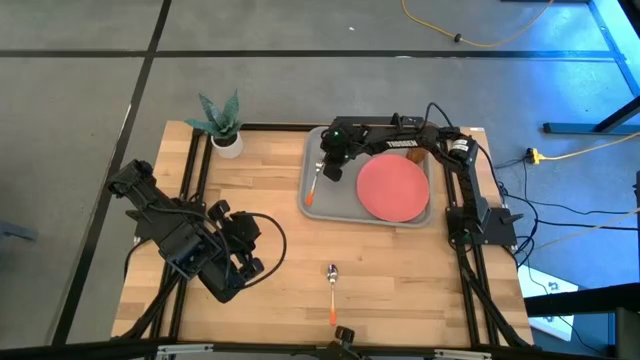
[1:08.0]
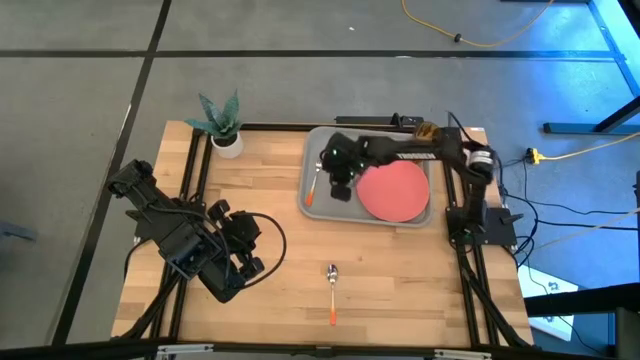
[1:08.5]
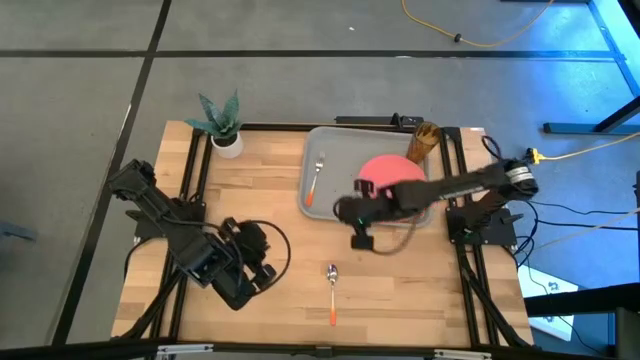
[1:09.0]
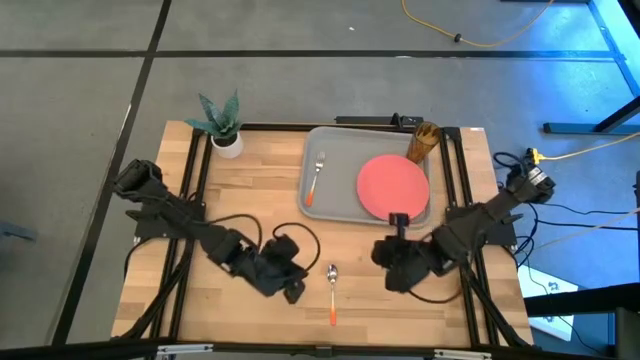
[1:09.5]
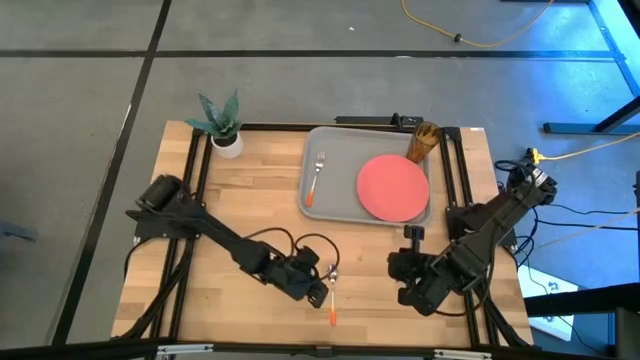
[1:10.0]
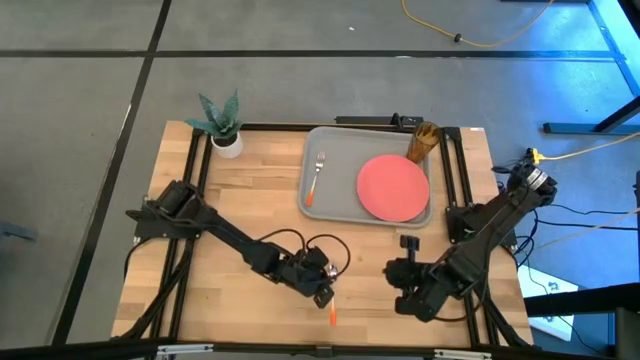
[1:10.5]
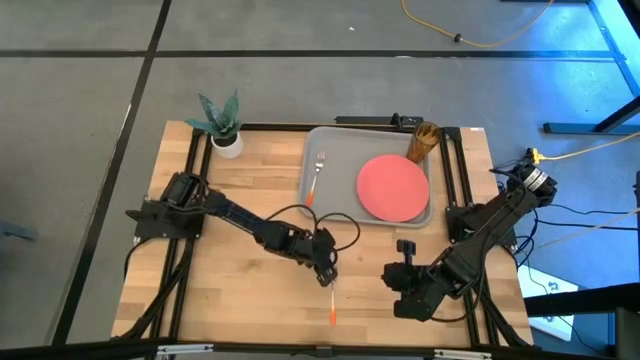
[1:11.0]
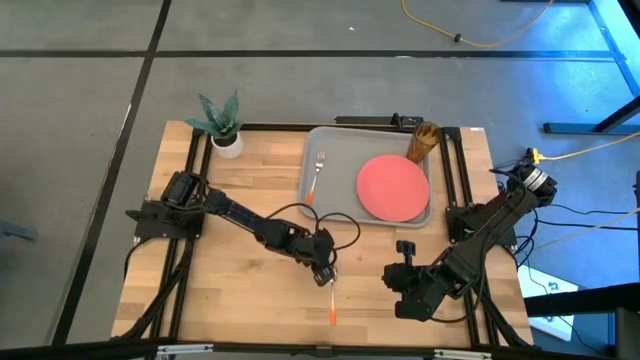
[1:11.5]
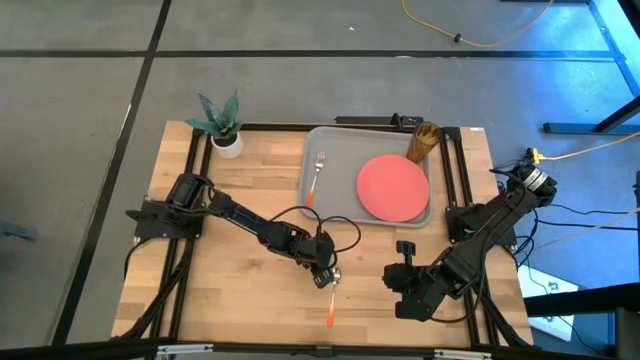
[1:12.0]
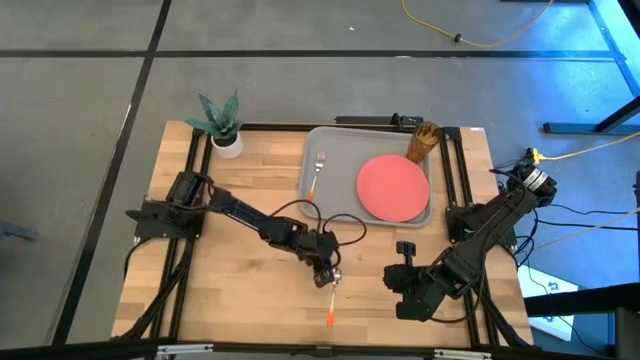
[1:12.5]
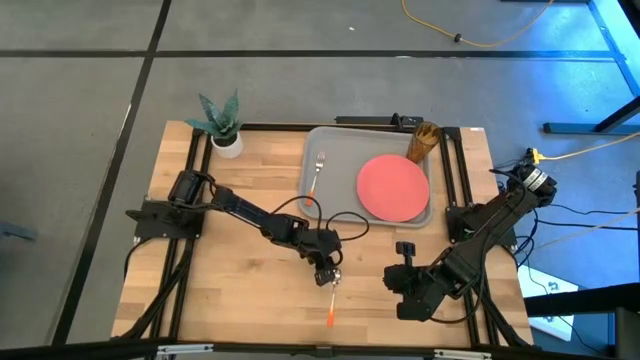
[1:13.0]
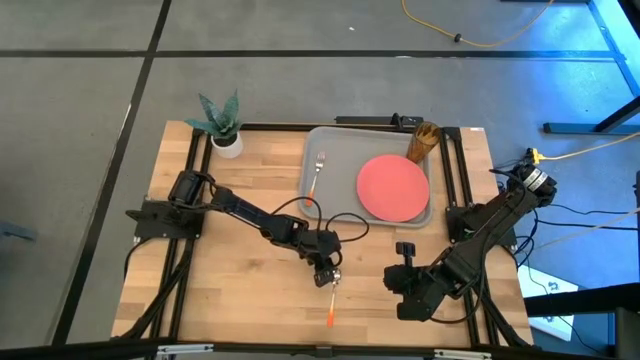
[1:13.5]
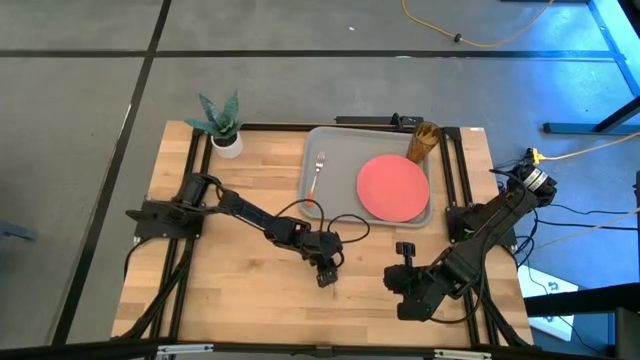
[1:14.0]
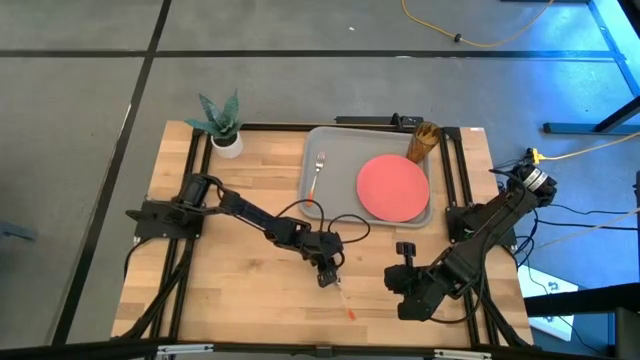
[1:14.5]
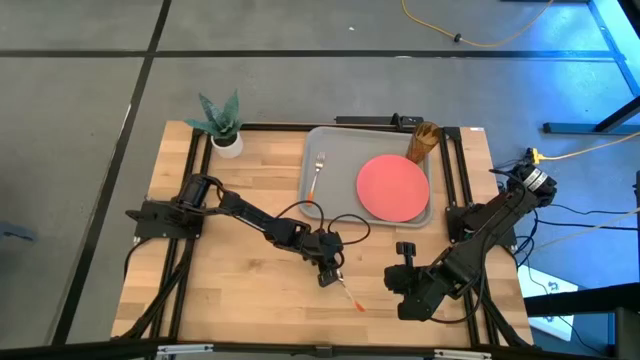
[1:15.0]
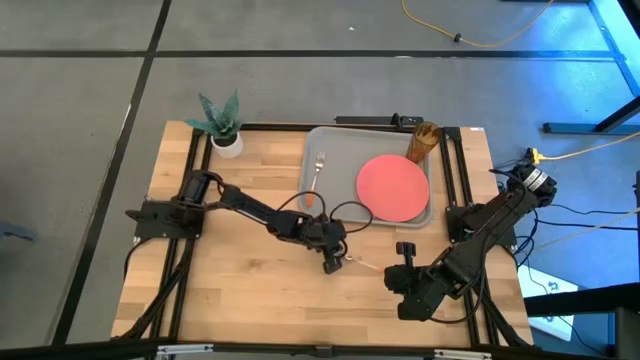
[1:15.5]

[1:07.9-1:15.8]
Task: Pick and place plate/cup/fork/spoon on tray
Put the orange spoon on the gray serving tray to the left of the pink plate

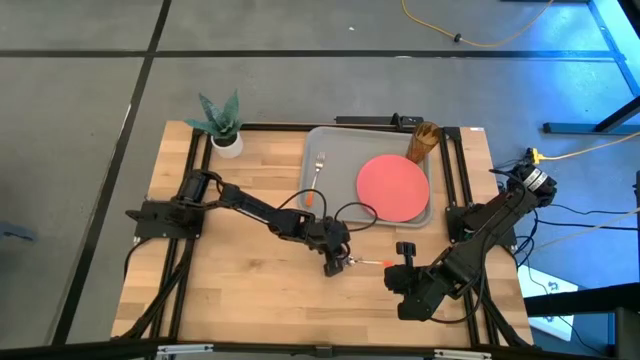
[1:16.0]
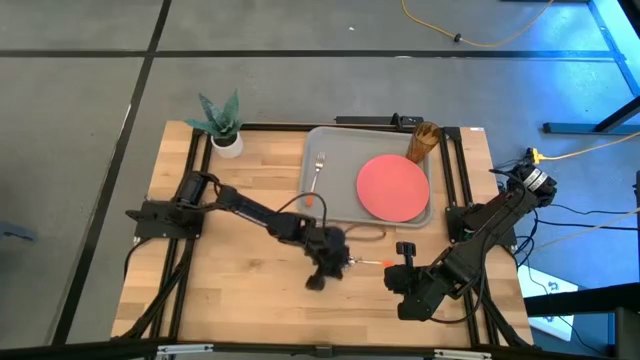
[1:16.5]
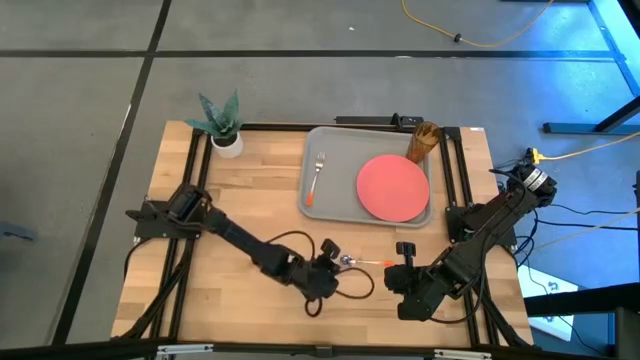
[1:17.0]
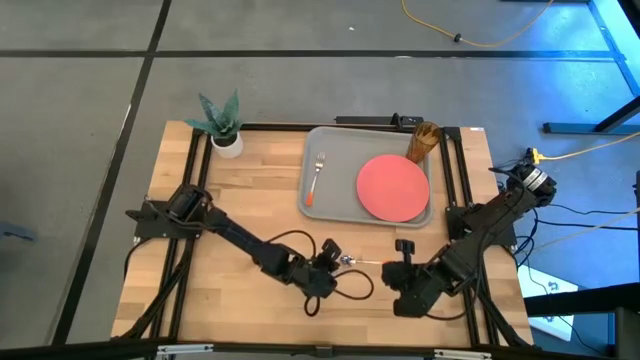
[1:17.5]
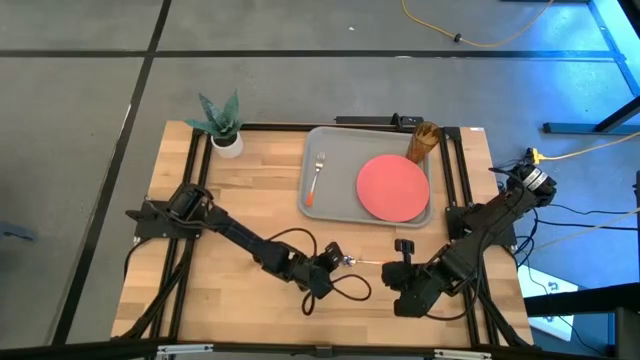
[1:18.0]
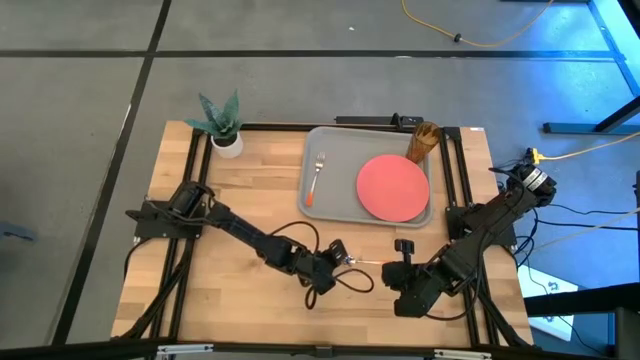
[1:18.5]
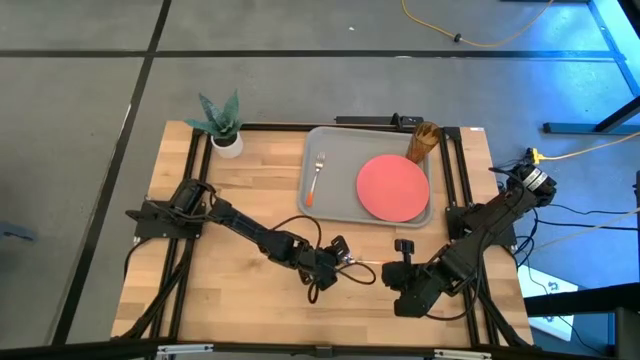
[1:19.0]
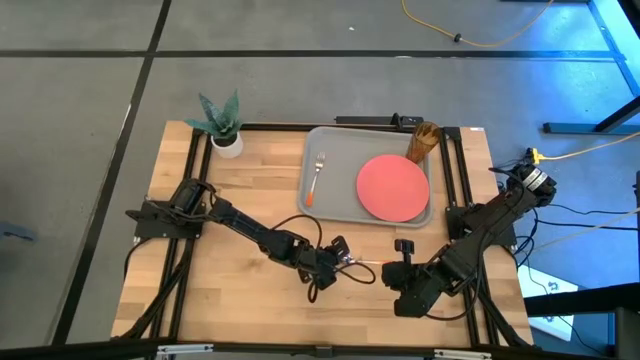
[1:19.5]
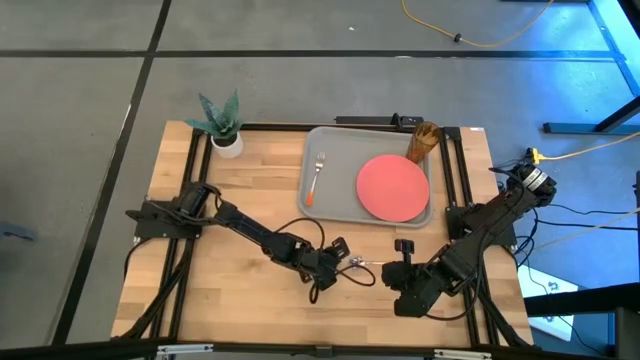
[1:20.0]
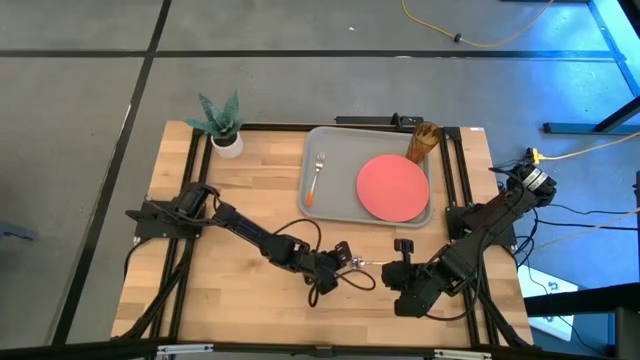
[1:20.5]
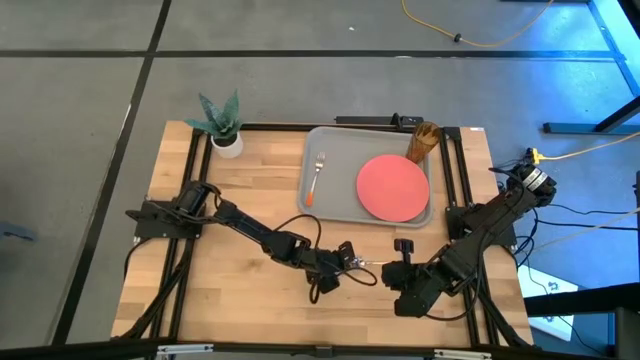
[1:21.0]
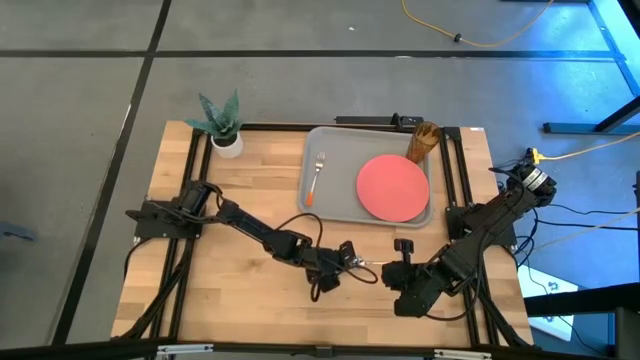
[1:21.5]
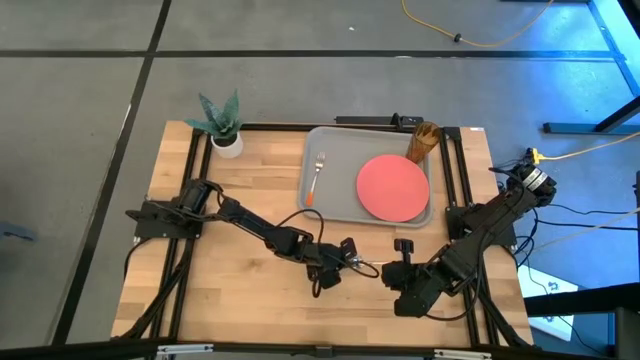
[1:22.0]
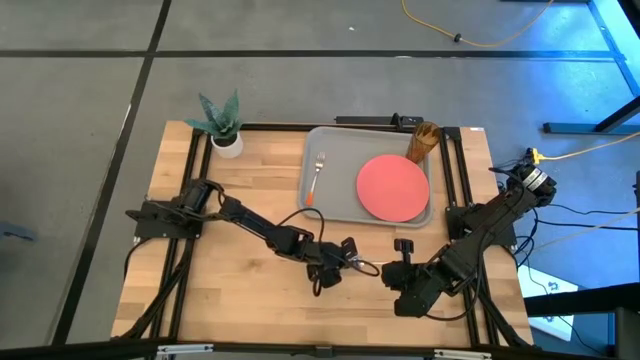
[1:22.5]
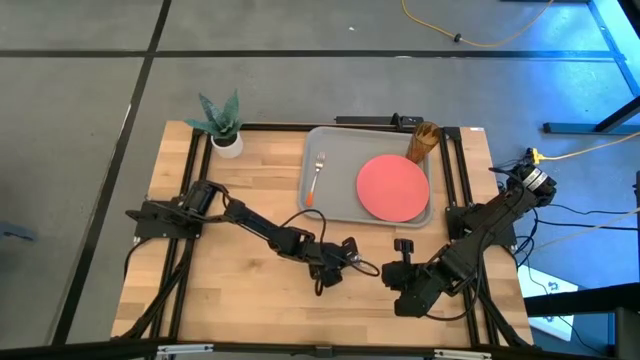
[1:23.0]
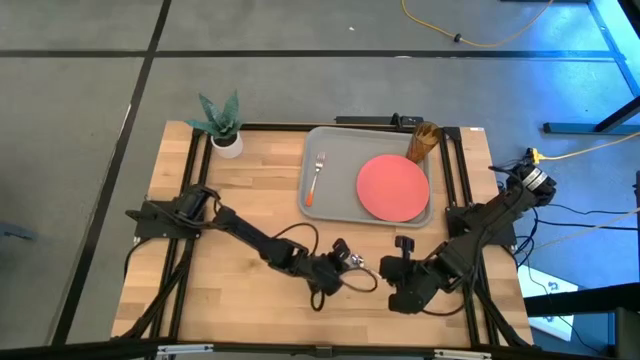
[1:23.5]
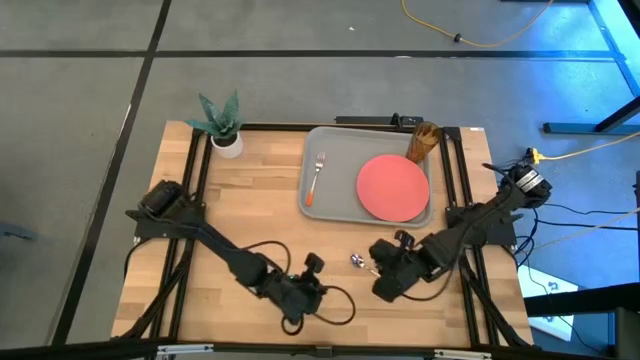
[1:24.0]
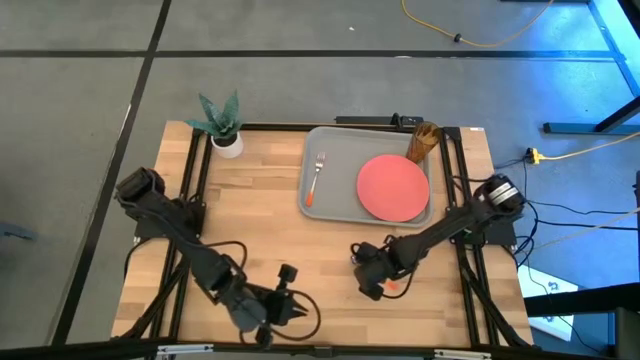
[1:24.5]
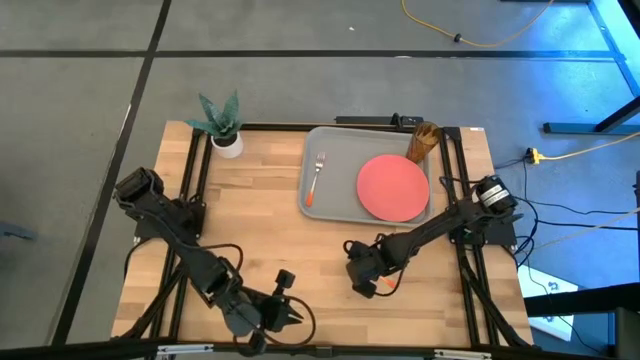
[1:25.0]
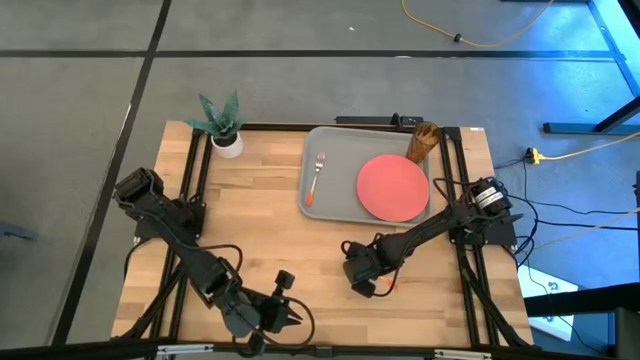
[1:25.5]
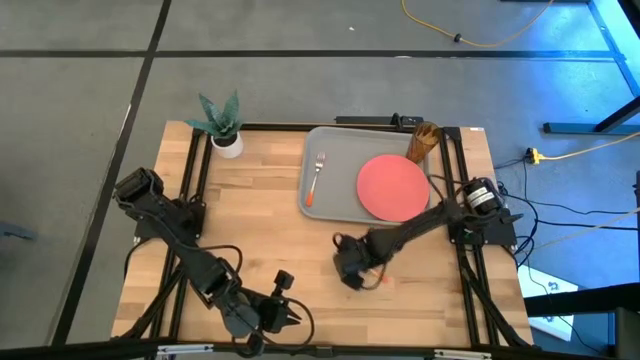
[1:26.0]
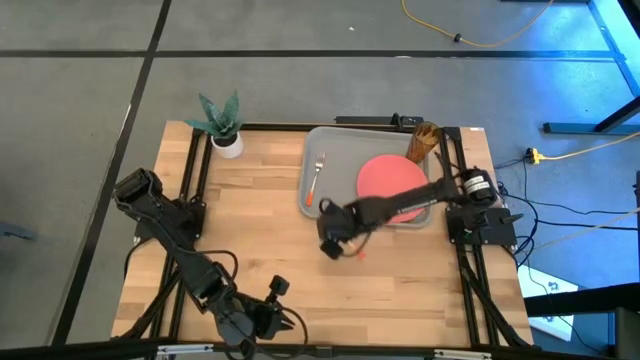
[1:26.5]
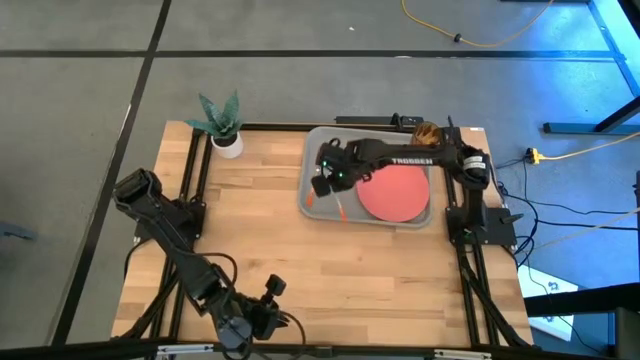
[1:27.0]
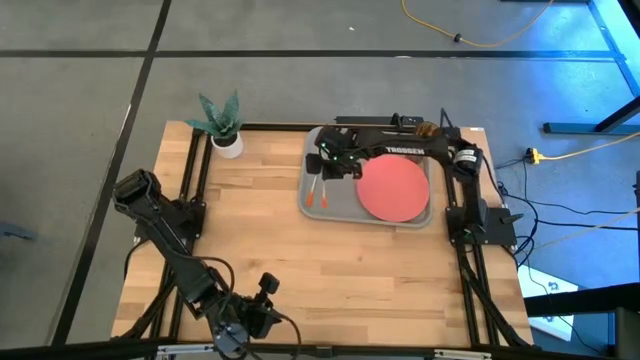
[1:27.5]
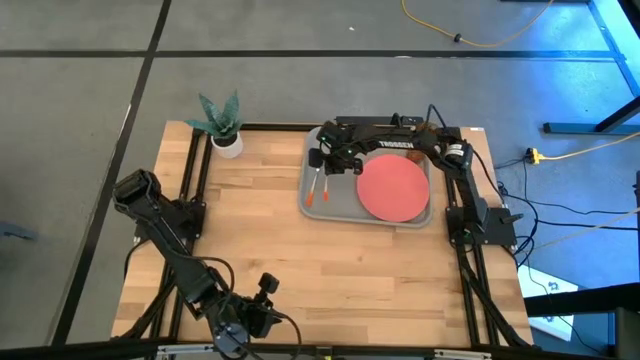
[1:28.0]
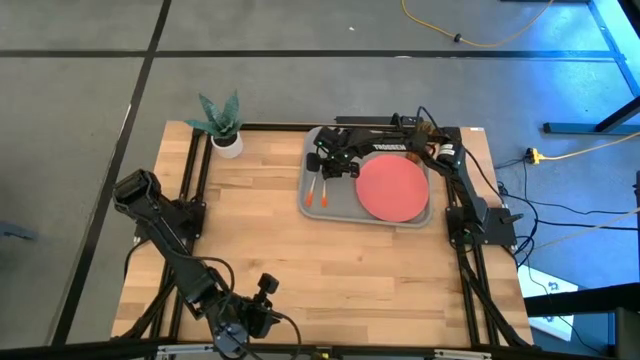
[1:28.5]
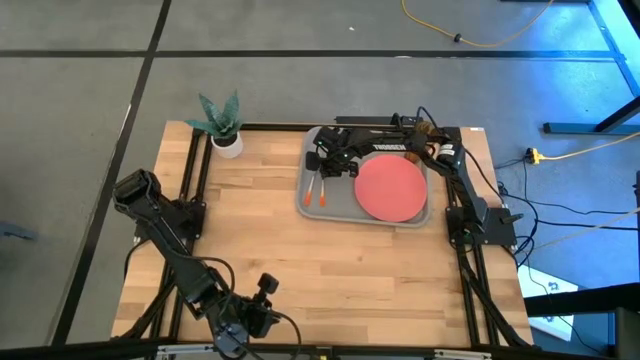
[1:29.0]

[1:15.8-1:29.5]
Put the orange spoon on the gray serving tray to the left of the pink plate
